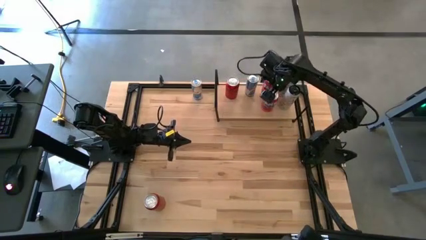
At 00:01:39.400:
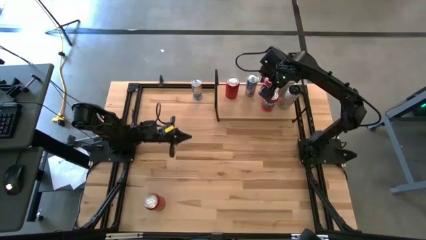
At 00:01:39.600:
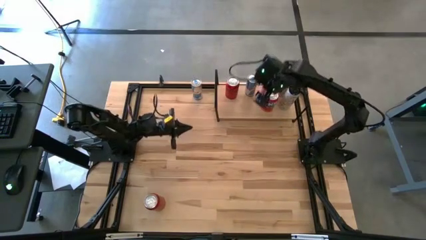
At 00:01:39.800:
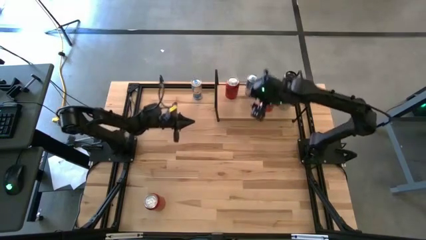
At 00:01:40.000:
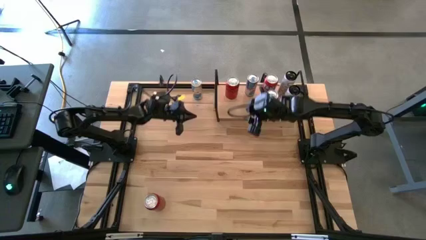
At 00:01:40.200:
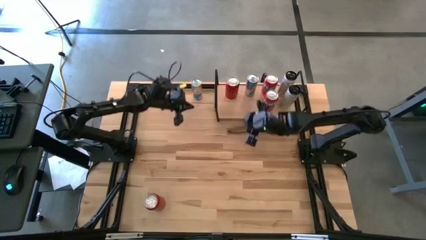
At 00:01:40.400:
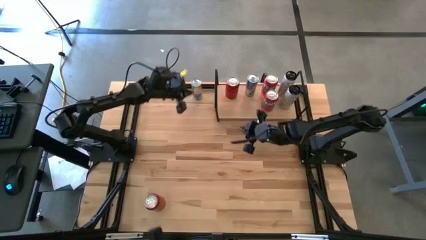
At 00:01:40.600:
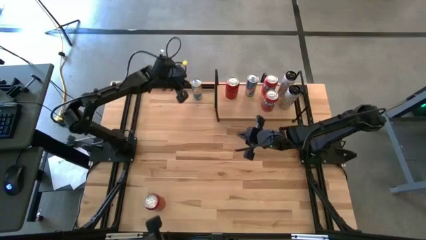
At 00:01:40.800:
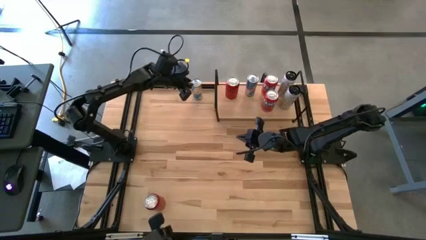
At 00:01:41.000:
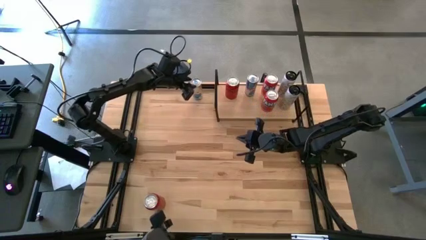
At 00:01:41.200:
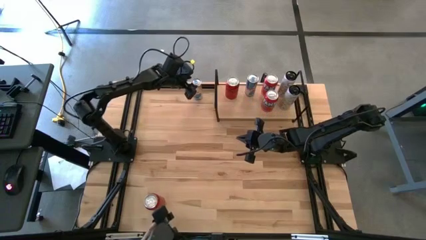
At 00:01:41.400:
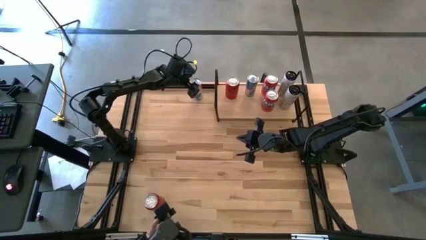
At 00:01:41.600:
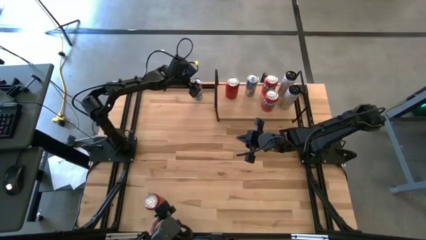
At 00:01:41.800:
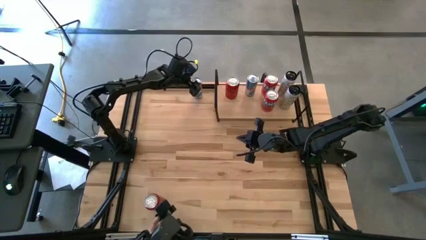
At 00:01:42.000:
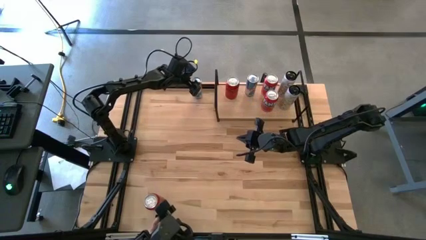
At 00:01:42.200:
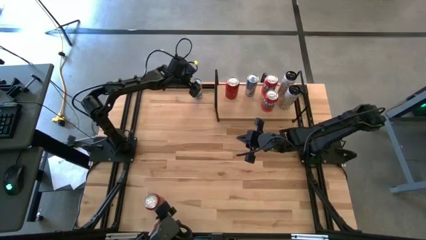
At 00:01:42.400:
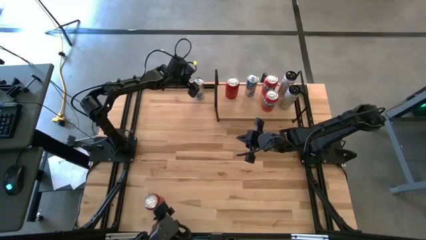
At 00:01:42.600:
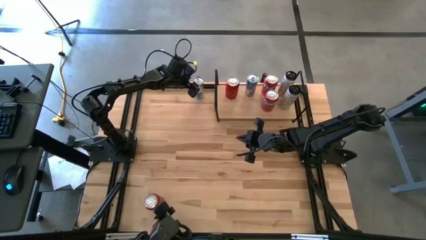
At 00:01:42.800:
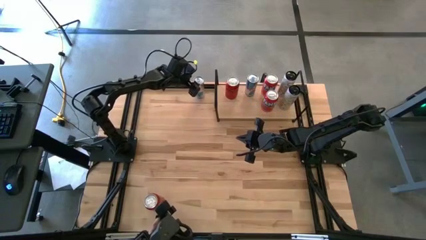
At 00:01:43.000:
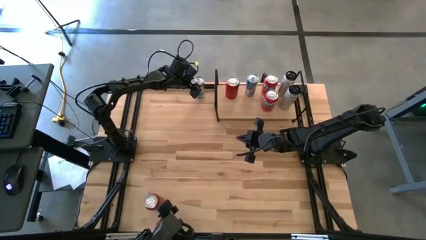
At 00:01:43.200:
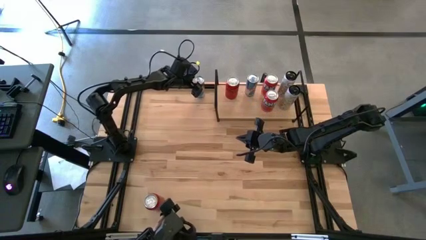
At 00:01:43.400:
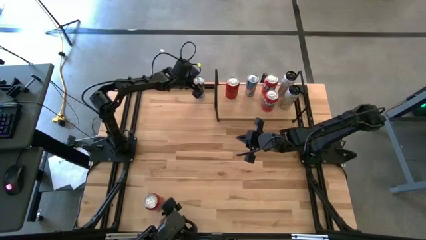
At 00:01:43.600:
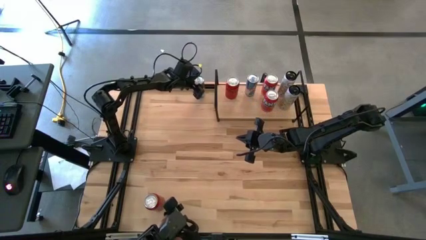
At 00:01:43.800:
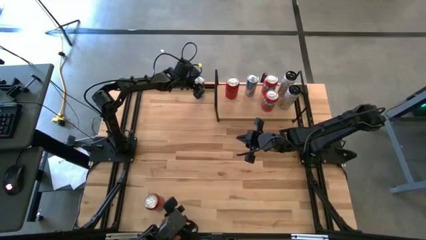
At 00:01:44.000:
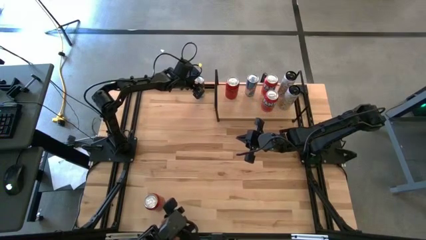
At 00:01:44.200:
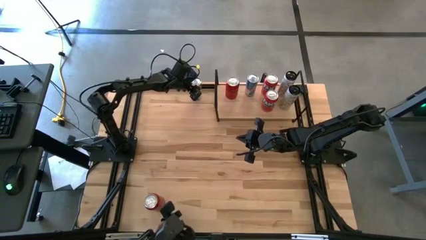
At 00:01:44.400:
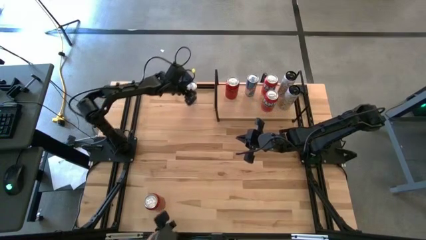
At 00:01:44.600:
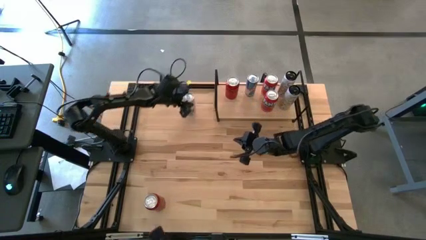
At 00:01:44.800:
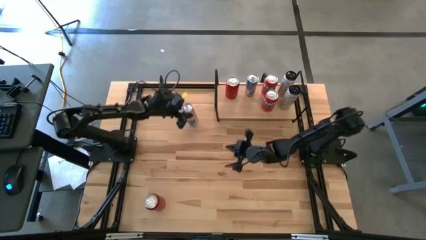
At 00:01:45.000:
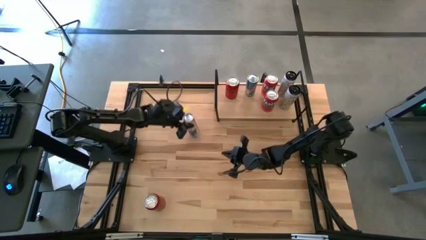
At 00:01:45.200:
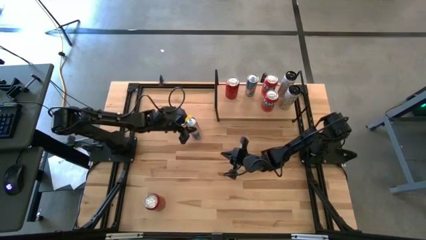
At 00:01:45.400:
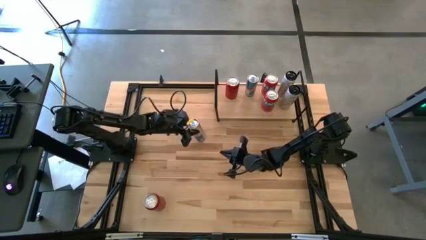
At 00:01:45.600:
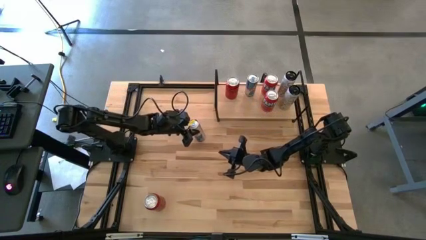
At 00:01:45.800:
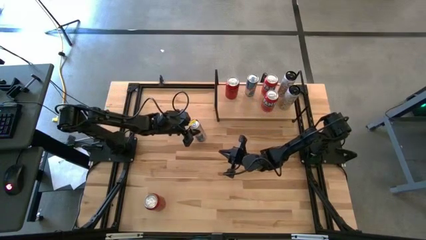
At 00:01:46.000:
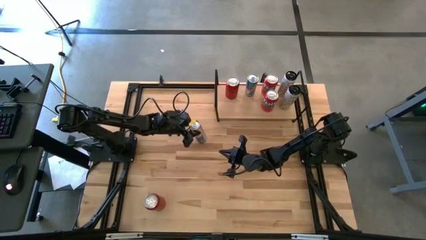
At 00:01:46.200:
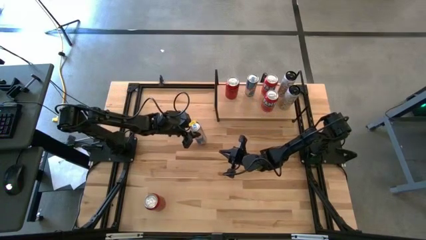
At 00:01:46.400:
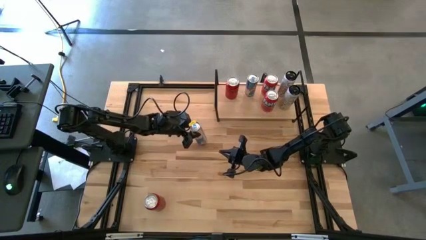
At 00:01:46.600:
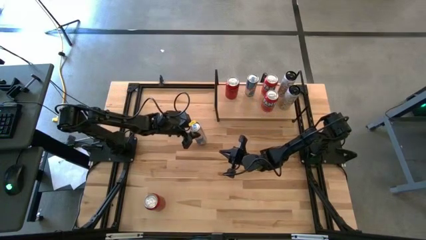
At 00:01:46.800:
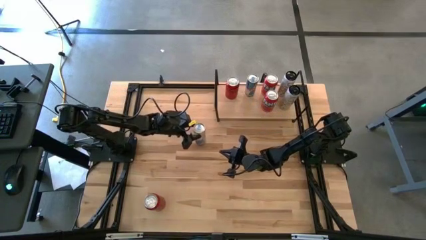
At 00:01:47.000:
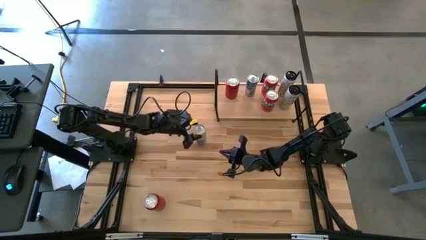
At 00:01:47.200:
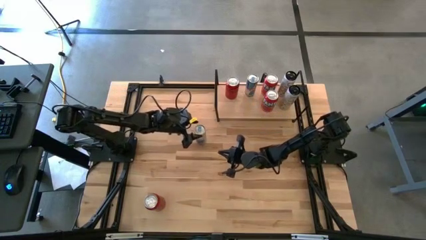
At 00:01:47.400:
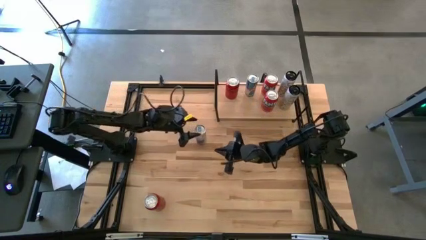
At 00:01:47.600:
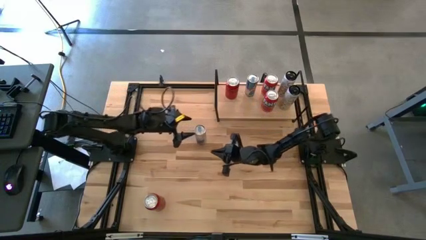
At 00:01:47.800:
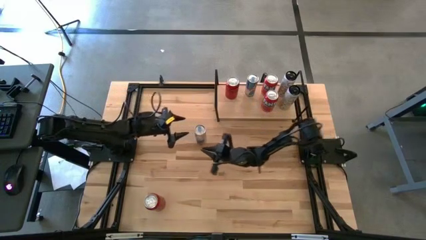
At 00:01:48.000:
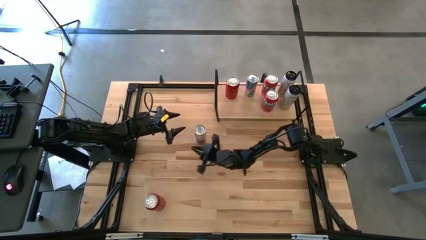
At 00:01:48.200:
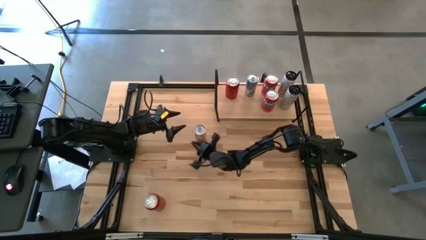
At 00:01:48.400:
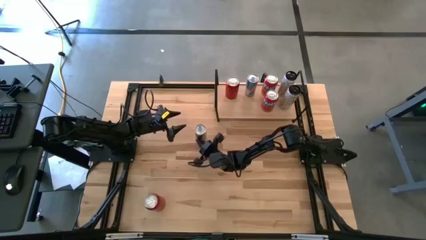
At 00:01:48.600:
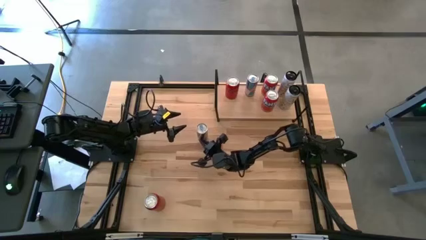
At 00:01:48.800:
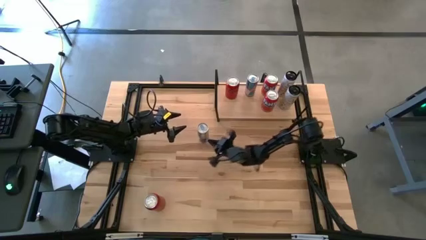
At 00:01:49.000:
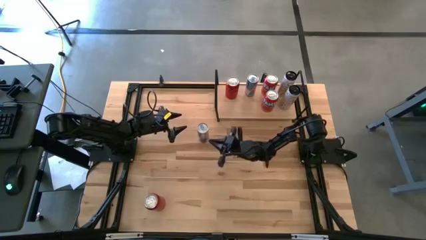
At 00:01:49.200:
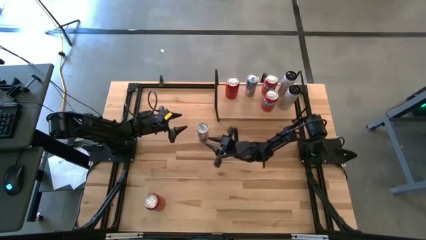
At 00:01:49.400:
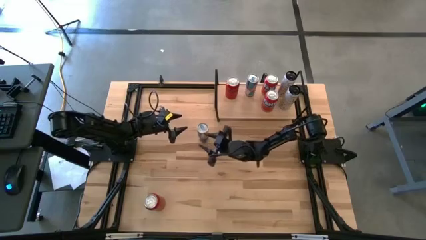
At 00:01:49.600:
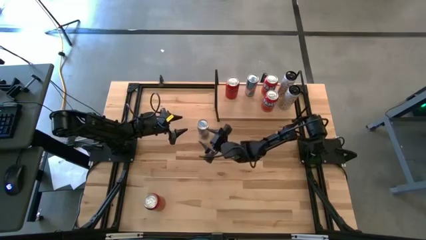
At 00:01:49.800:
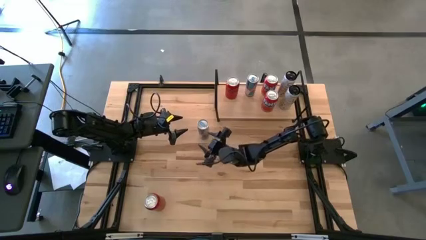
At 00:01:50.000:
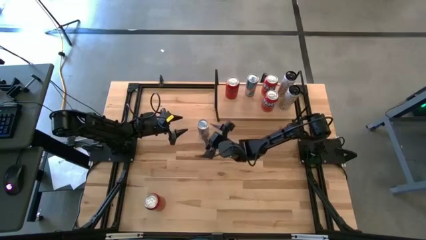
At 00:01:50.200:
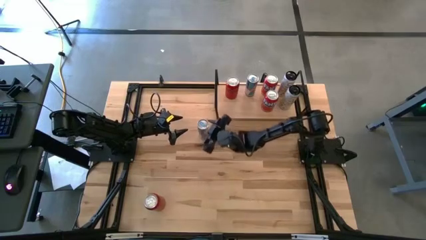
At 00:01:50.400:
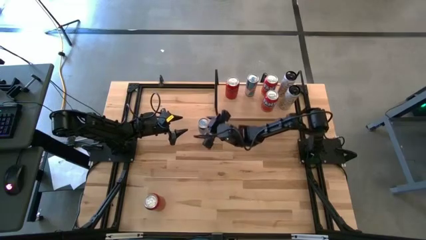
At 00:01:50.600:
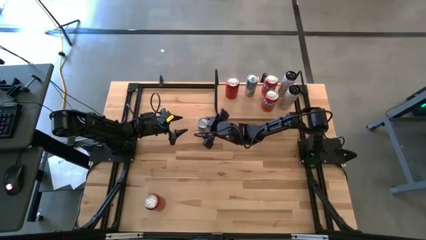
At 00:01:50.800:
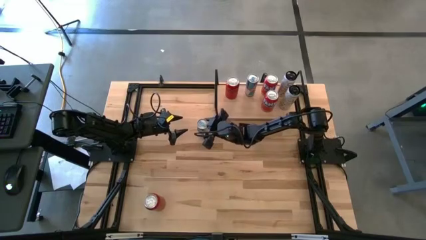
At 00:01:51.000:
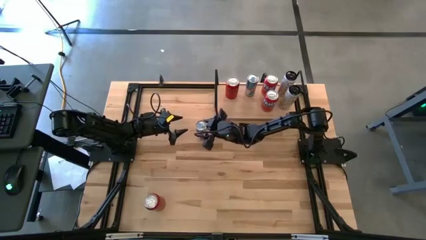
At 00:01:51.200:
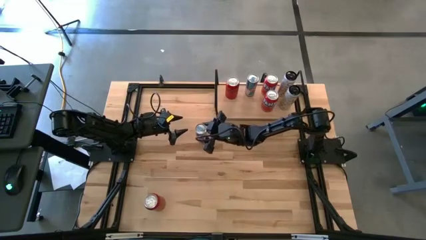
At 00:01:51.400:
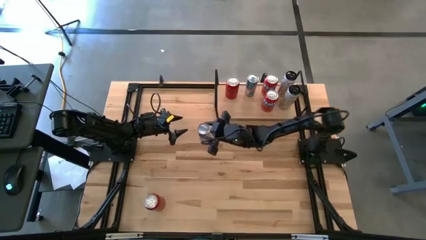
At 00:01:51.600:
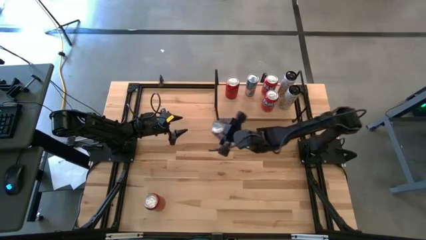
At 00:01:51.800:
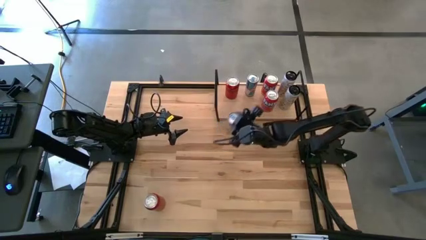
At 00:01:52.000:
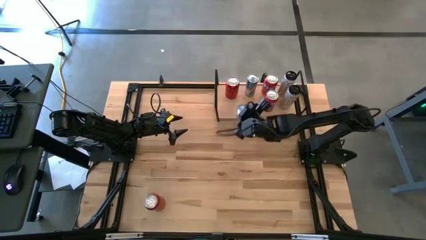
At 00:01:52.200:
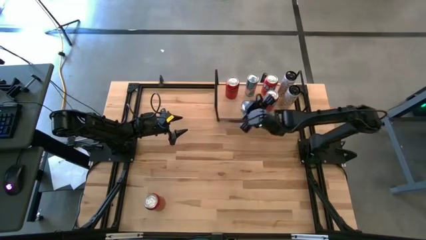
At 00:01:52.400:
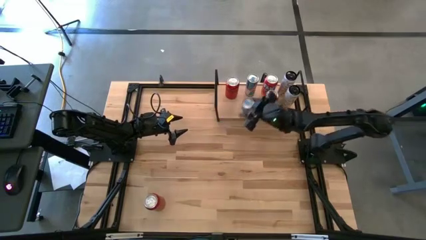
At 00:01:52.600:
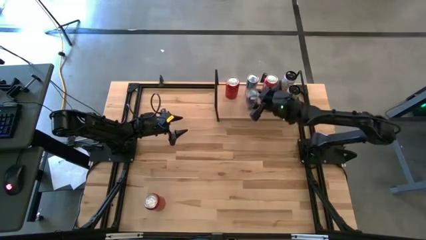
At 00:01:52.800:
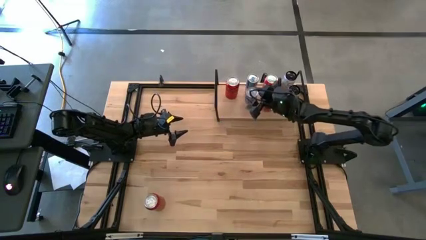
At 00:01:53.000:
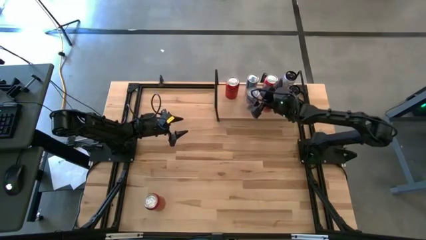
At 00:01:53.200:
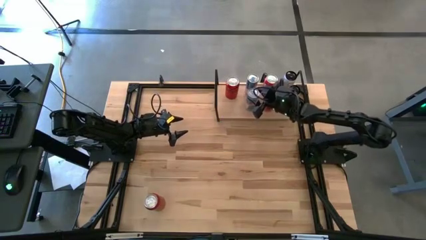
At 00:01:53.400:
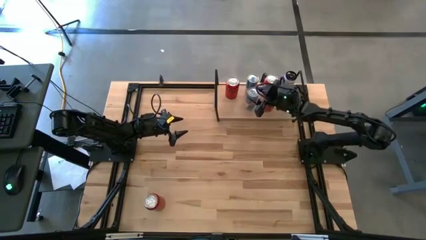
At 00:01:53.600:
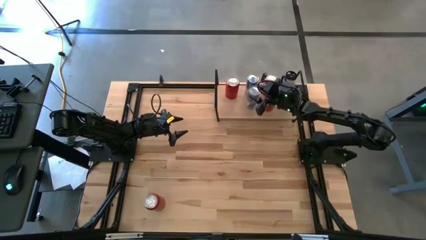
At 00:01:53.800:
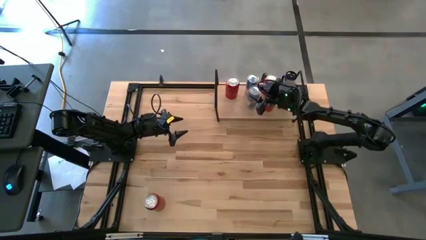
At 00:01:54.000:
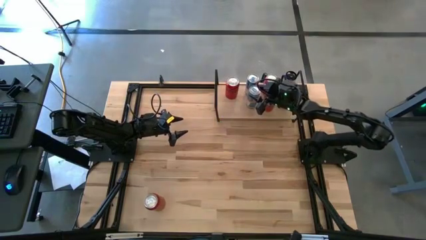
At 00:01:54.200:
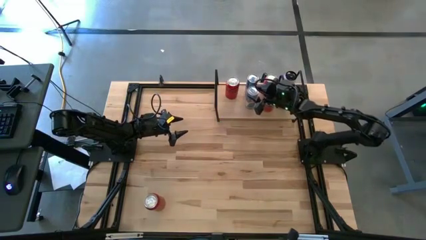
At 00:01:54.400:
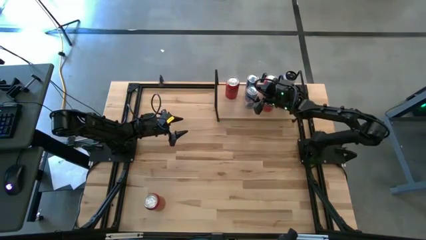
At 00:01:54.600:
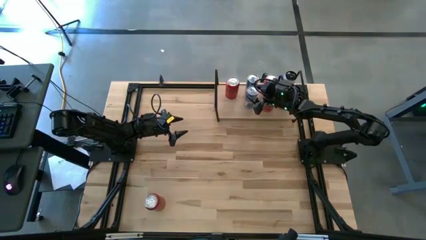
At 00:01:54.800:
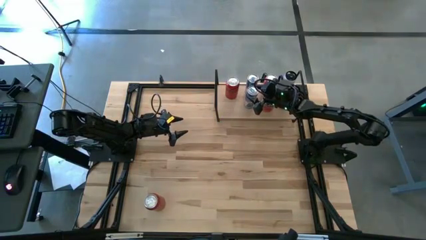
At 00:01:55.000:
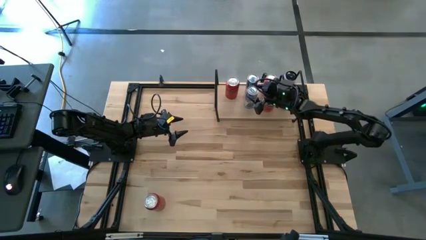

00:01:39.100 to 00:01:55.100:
Task: Place canned beverage on shelf
Put the blue soda can on the shelf aligned with the other blue soda can
